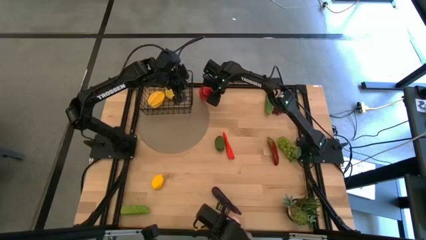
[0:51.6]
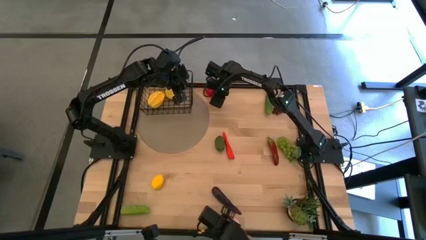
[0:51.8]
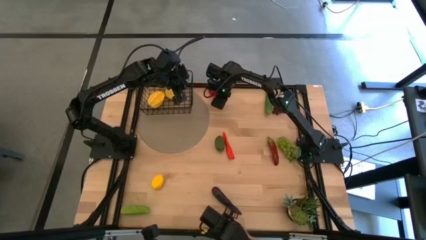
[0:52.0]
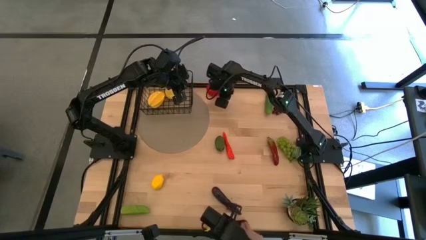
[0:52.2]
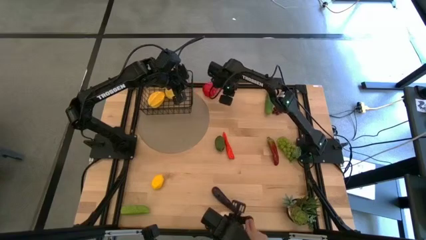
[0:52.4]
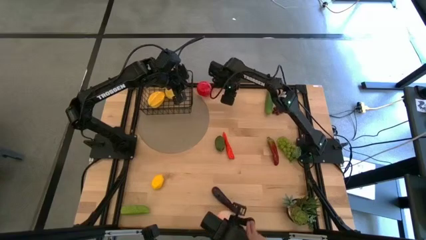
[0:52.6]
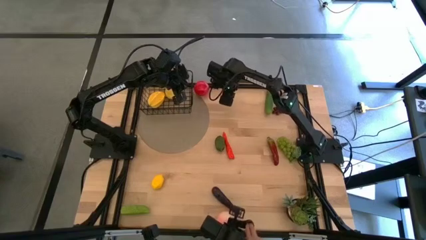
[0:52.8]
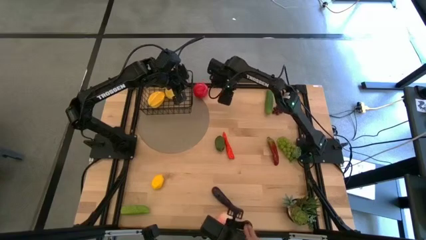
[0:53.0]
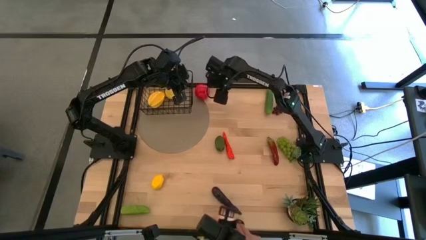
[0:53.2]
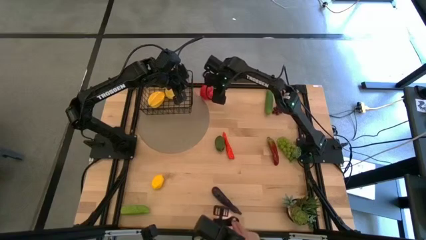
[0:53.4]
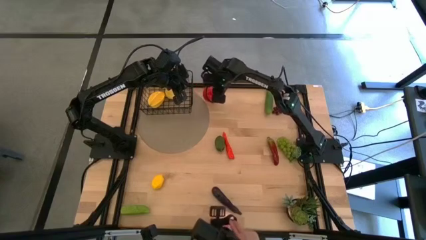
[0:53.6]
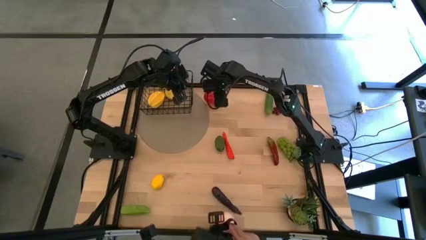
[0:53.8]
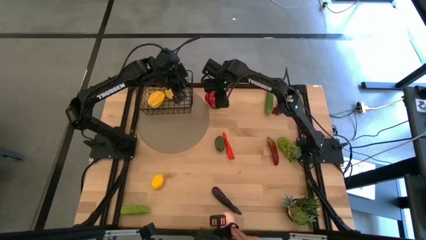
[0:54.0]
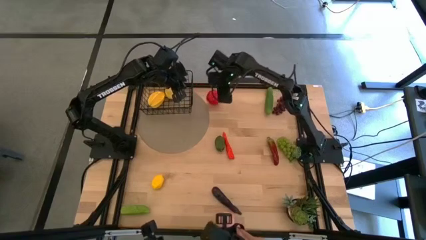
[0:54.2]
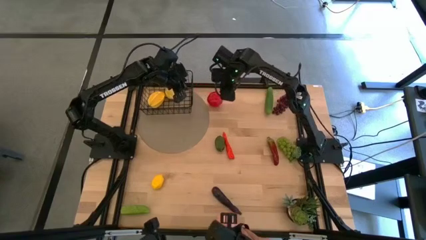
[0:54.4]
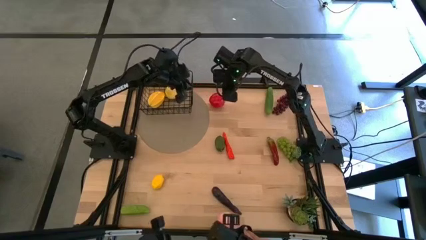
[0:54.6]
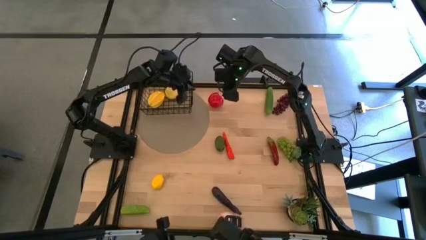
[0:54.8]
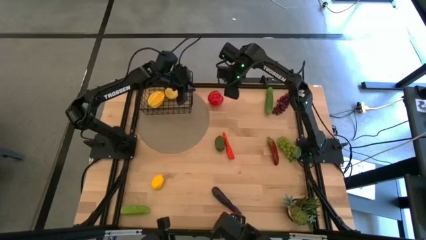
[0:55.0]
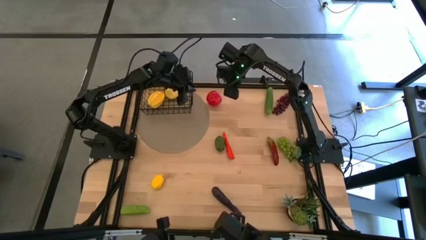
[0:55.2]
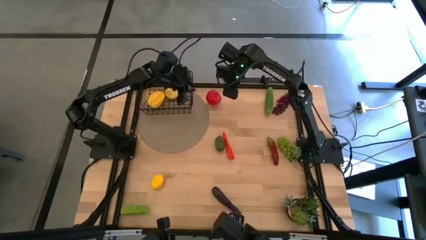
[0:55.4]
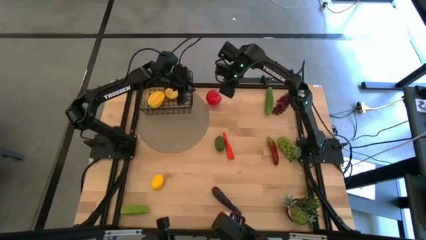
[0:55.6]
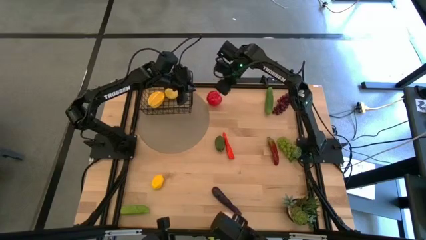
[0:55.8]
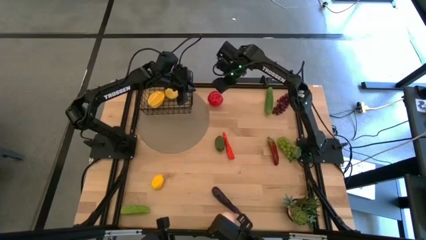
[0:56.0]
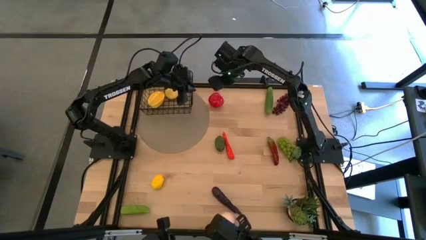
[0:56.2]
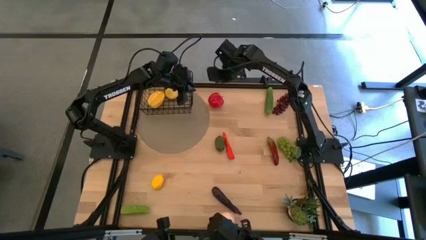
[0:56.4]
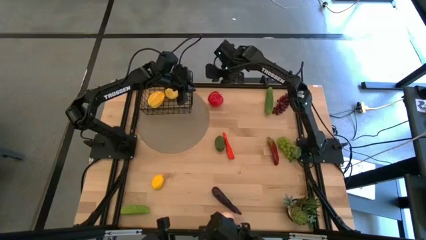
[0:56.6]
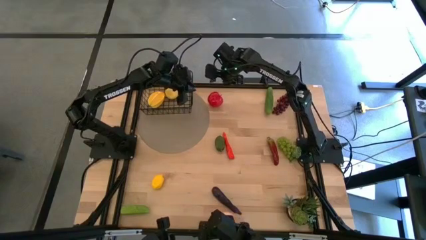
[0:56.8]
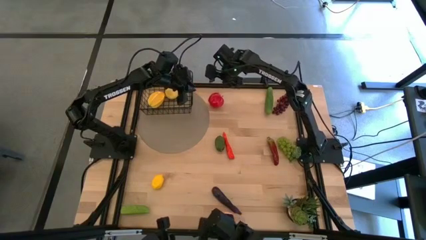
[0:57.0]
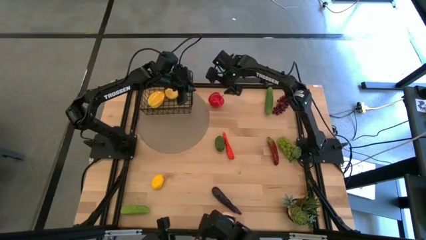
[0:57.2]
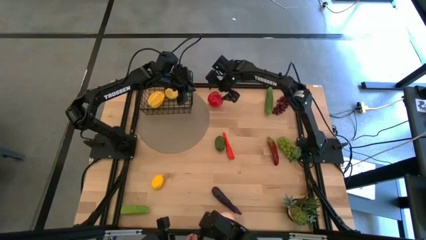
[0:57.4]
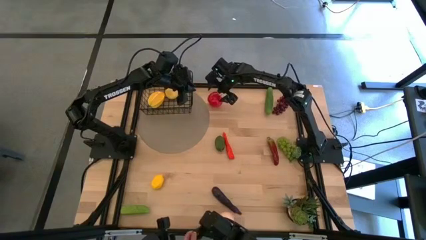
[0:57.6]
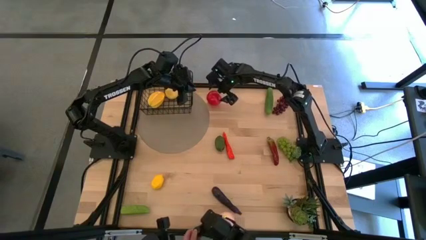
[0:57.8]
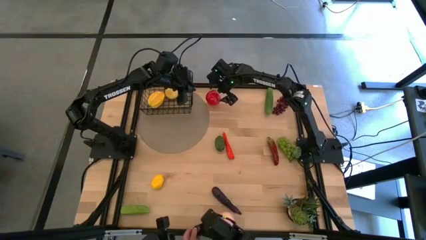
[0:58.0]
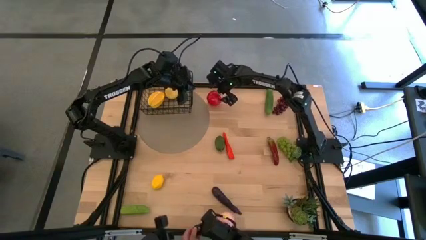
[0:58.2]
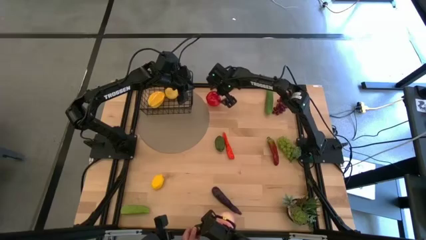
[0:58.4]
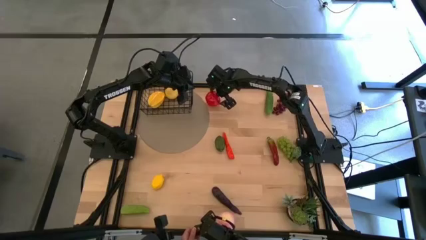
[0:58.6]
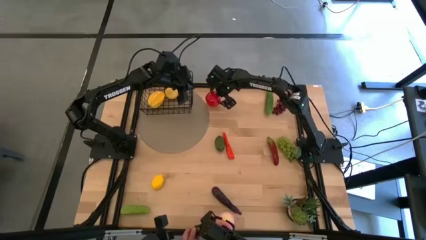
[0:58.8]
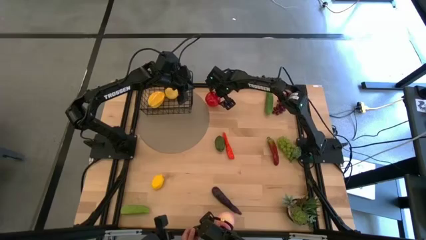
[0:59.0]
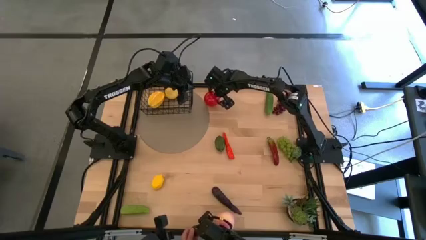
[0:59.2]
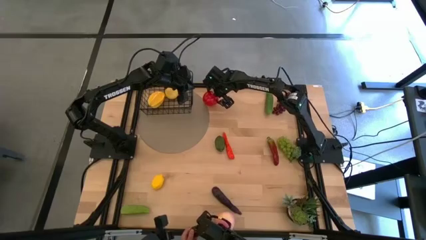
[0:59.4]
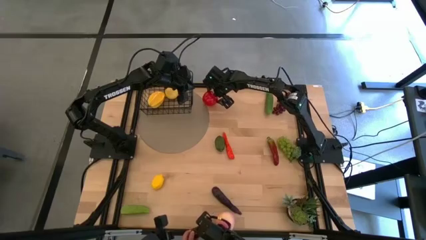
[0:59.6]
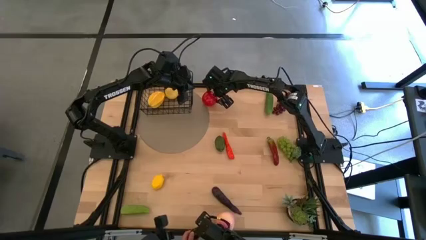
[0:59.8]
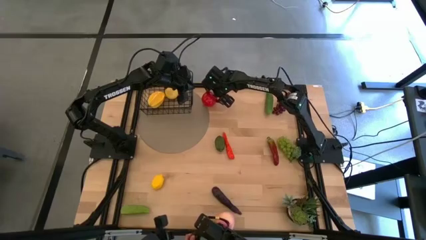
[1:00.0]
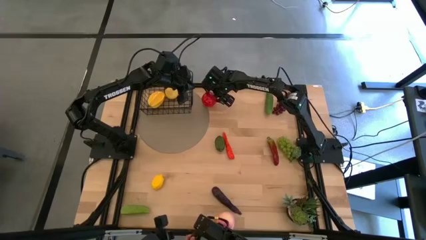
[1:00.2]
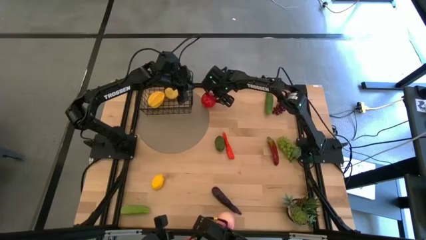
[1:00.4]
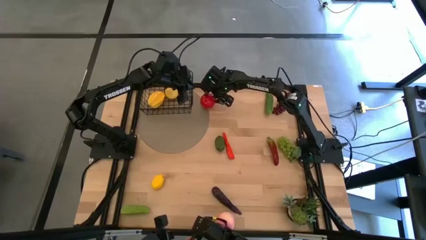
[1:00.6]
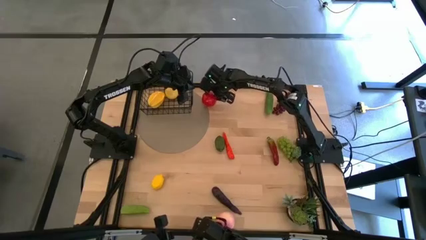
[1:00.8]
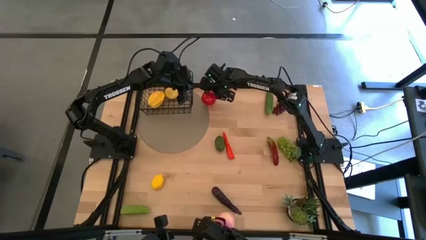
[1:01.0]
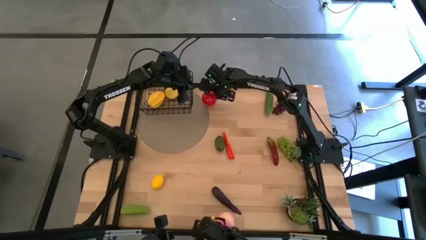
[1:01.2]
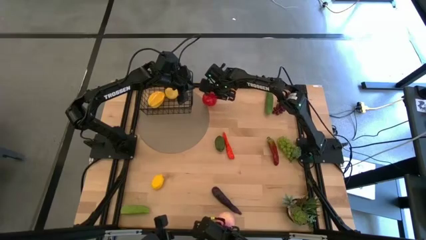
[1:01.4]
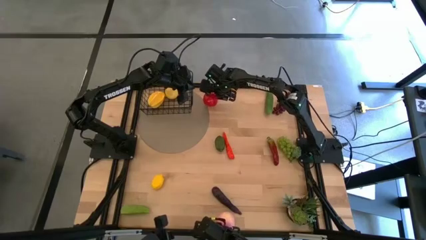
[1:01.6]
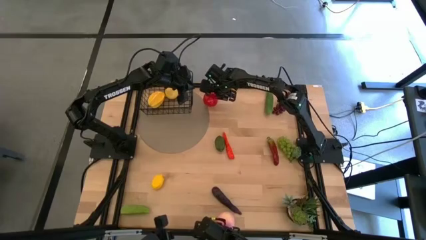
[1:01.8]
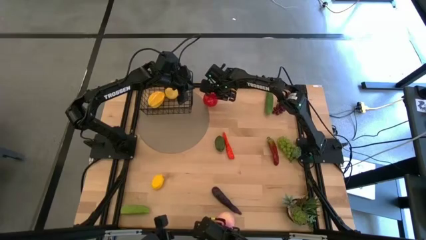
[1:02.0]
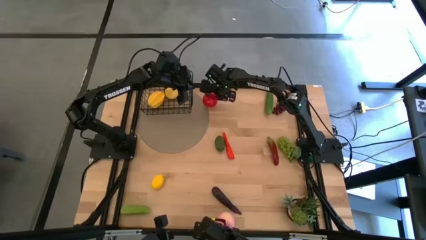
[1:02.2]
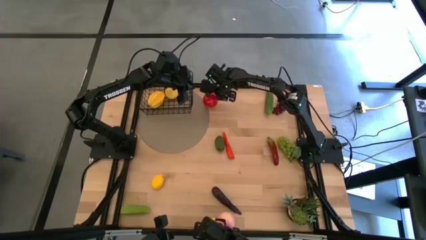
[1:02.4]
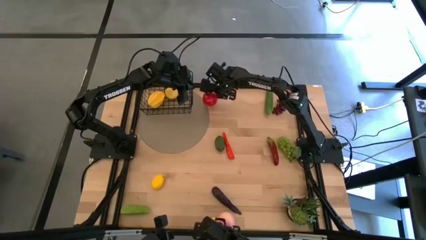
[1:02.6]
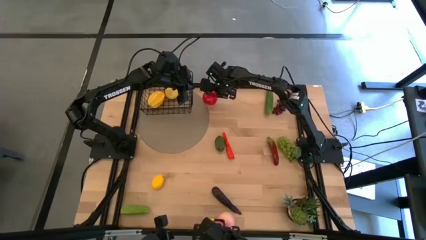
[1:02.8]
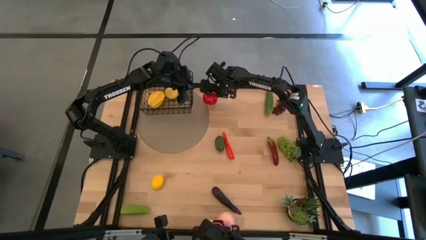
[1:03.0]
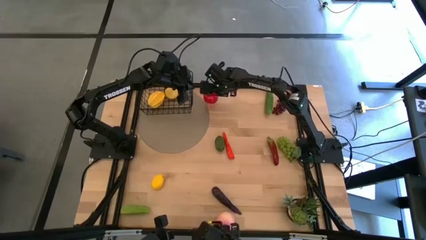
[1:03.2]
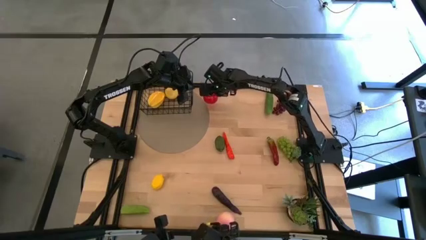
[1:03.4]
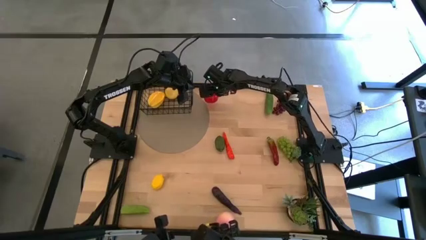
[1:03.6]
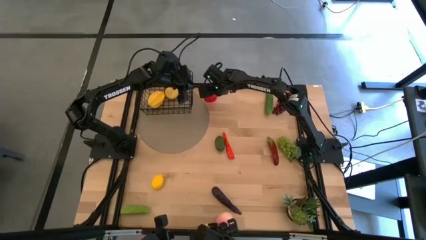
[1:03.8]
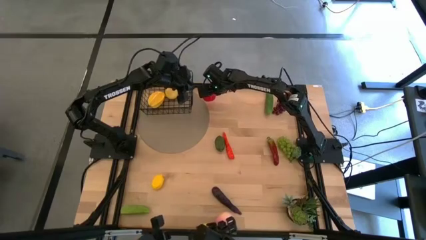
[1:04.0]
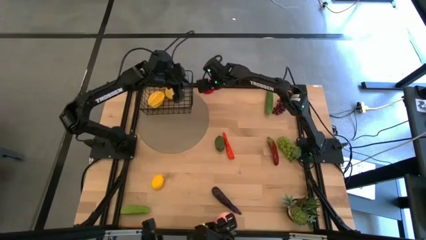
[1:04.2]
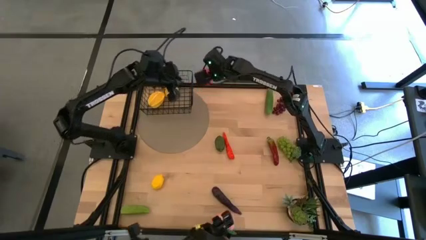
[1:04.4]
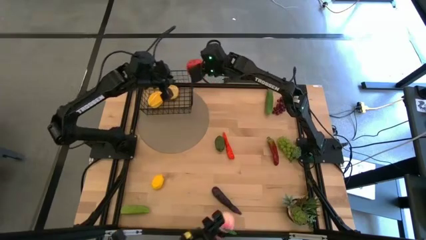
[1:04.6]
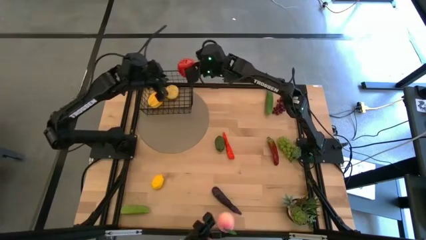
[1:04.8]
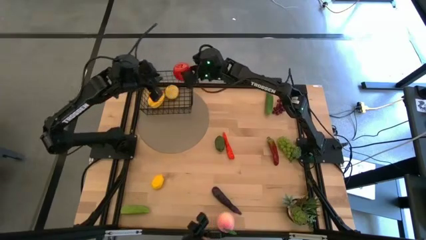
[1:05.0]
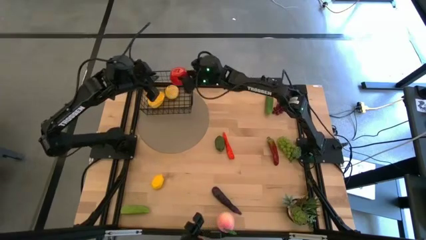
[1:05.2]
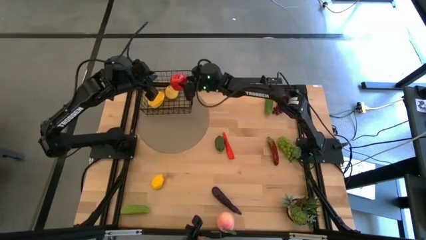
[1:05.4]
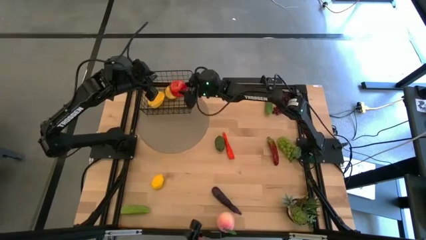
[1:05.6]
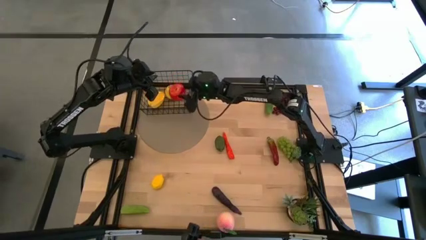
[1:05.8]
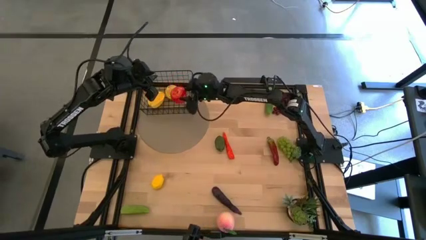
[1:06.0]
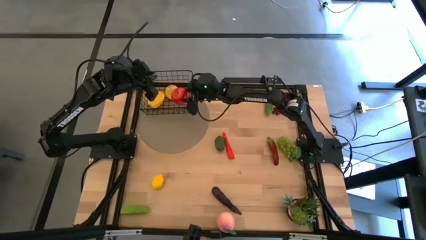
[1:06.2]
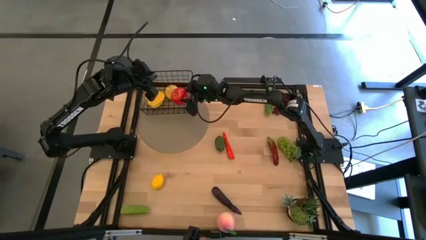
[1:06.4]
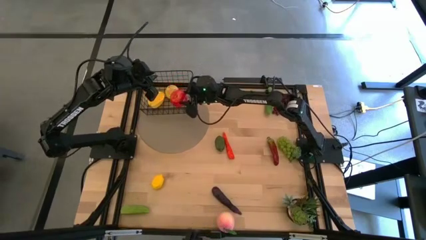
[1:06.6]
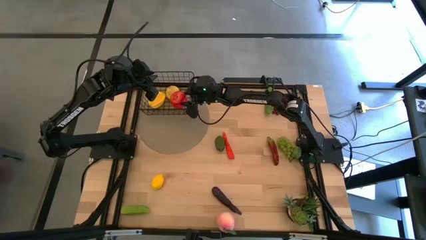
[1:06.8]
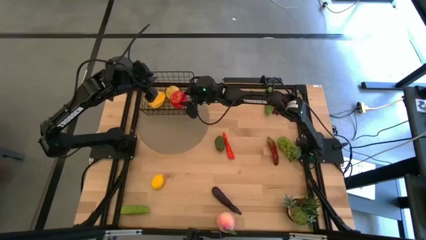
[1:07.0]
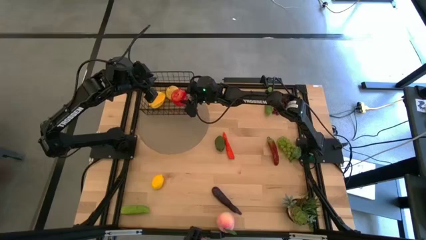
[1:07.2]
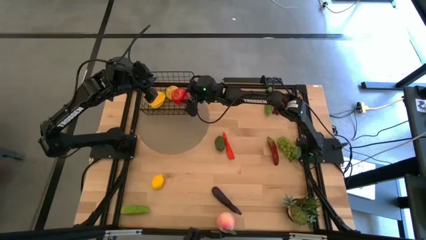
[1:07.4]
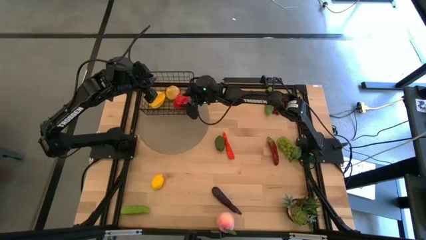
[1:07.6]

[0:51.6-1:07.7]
Task: Build produce basket
Put the red apple into the black wire basket
